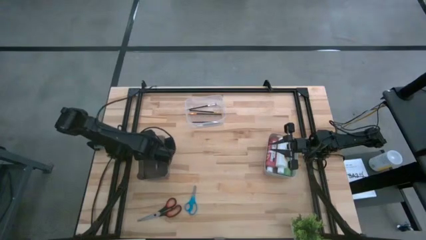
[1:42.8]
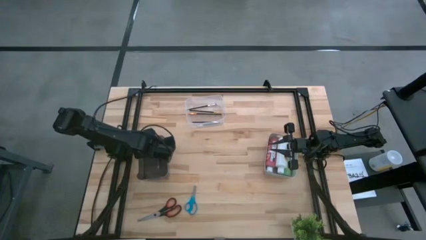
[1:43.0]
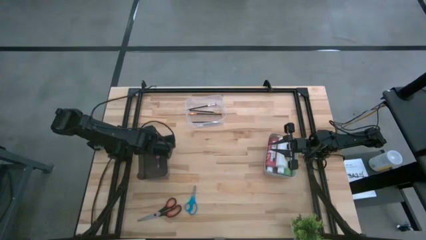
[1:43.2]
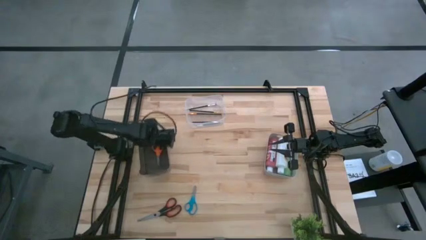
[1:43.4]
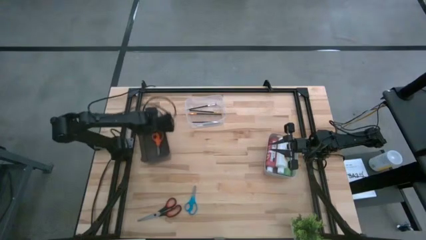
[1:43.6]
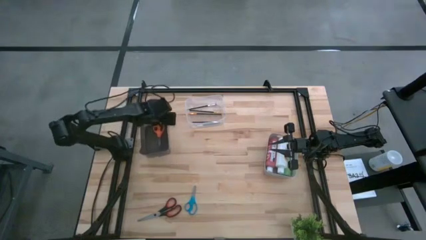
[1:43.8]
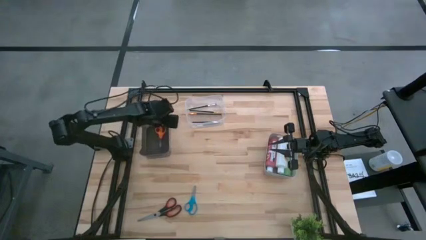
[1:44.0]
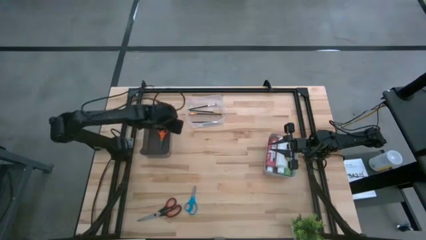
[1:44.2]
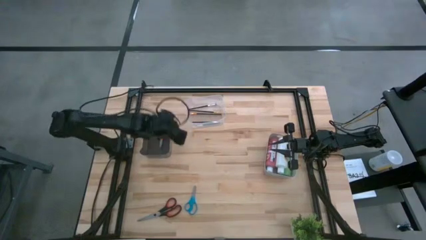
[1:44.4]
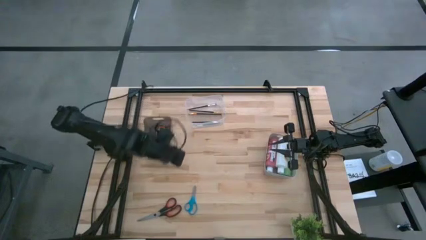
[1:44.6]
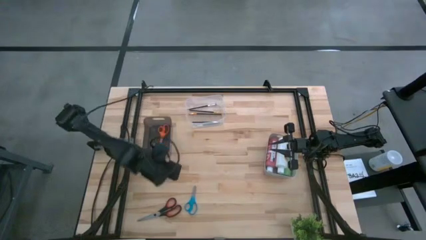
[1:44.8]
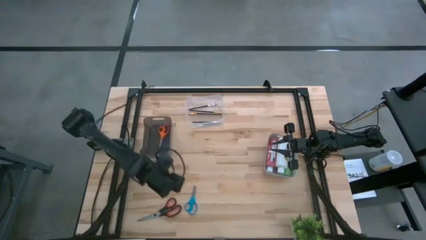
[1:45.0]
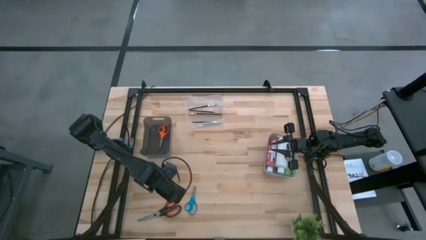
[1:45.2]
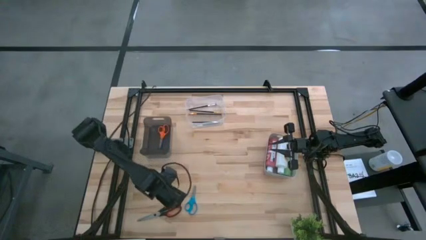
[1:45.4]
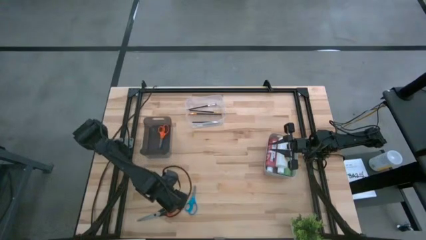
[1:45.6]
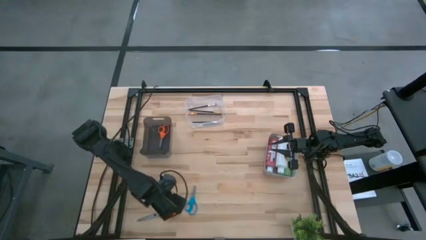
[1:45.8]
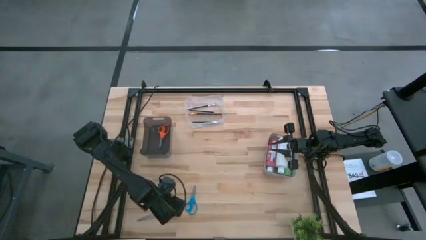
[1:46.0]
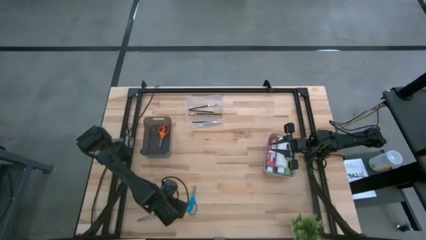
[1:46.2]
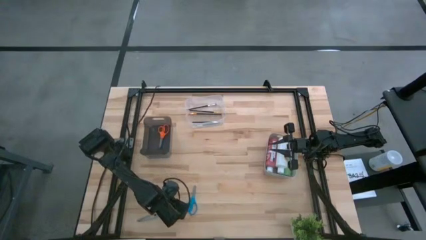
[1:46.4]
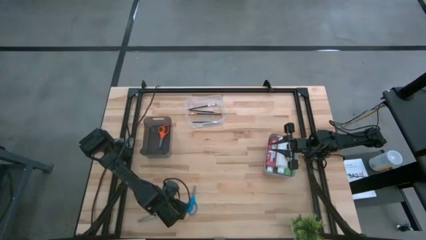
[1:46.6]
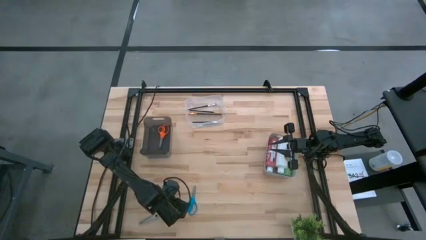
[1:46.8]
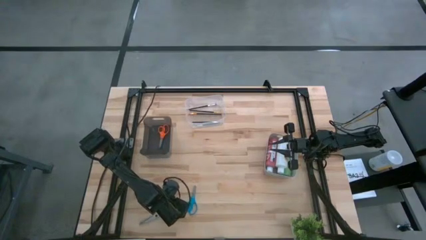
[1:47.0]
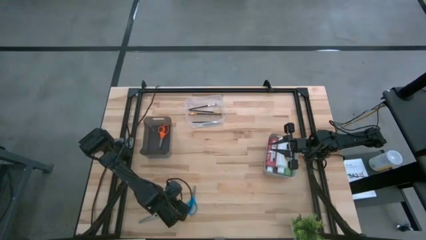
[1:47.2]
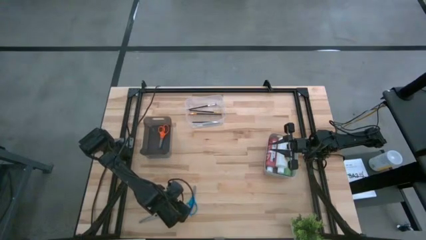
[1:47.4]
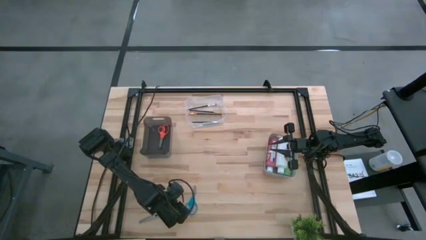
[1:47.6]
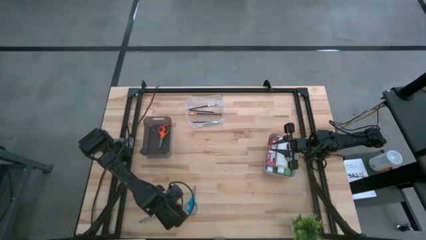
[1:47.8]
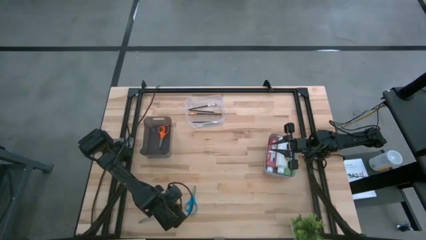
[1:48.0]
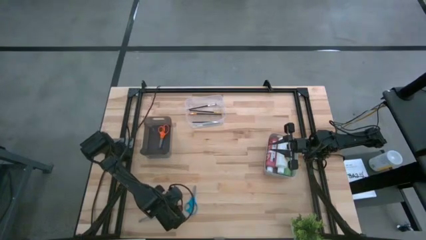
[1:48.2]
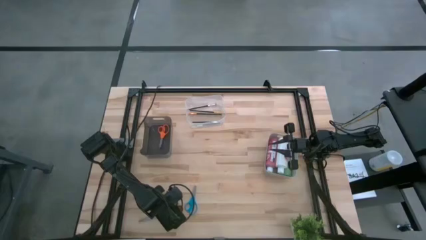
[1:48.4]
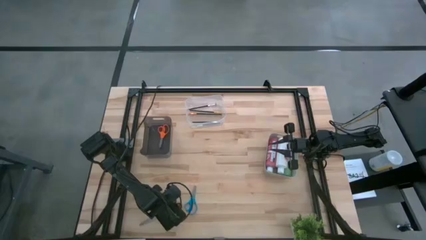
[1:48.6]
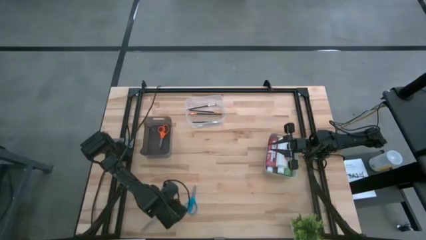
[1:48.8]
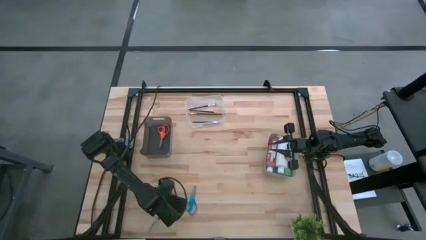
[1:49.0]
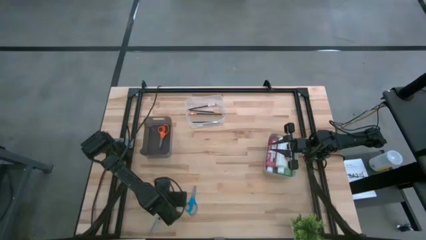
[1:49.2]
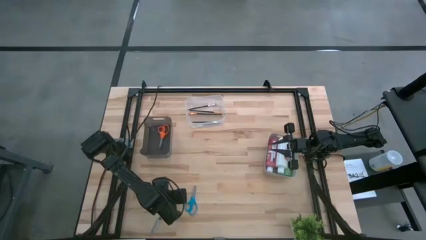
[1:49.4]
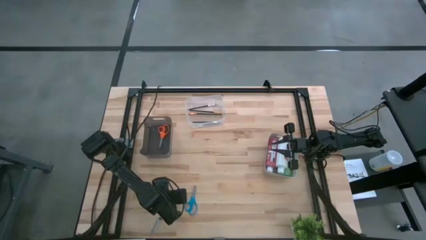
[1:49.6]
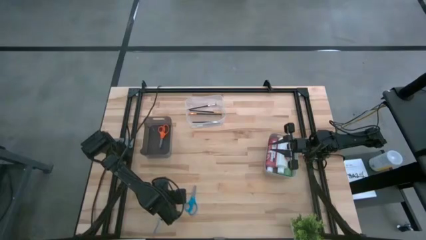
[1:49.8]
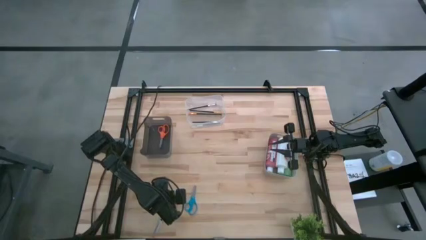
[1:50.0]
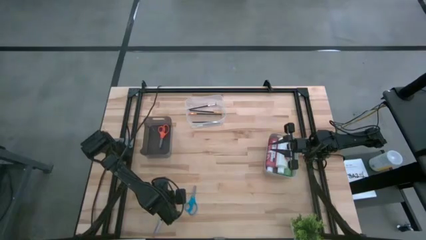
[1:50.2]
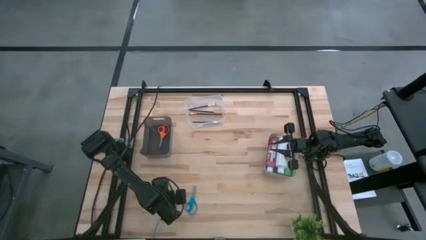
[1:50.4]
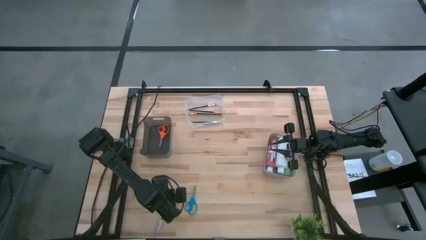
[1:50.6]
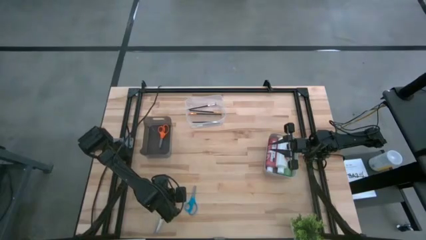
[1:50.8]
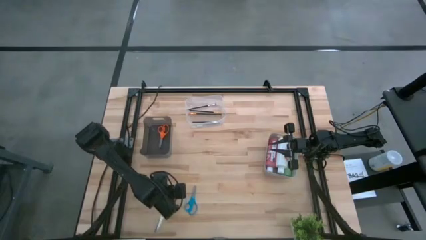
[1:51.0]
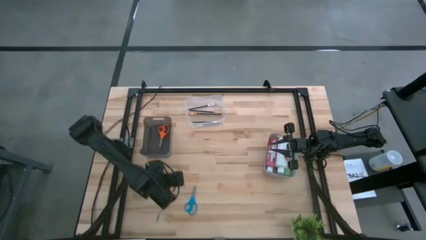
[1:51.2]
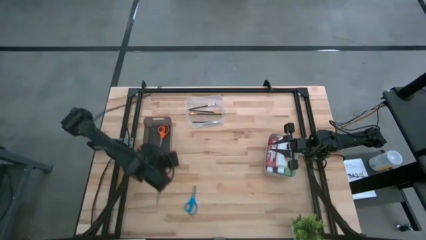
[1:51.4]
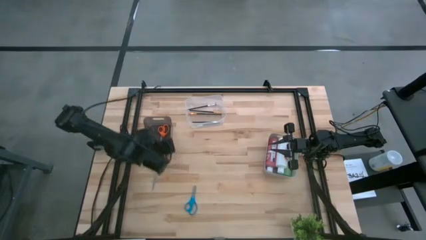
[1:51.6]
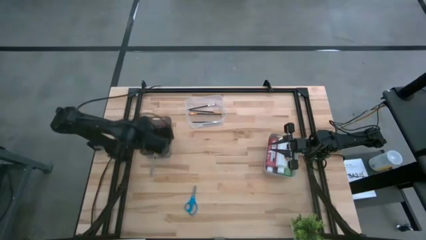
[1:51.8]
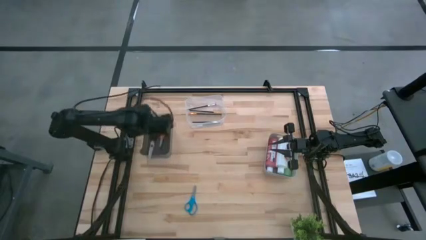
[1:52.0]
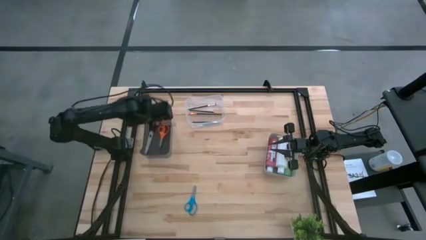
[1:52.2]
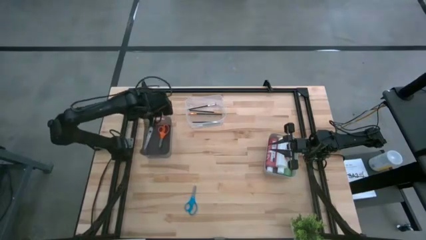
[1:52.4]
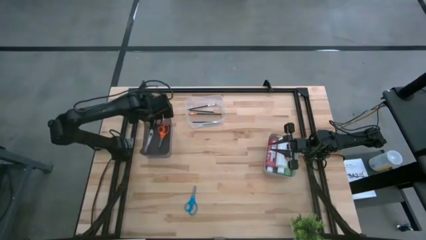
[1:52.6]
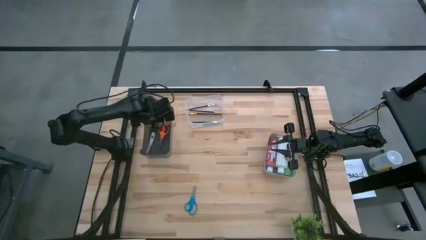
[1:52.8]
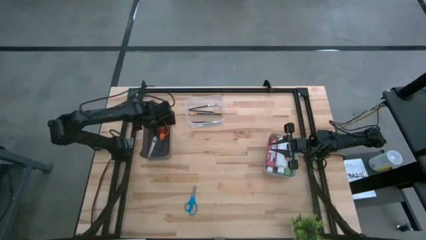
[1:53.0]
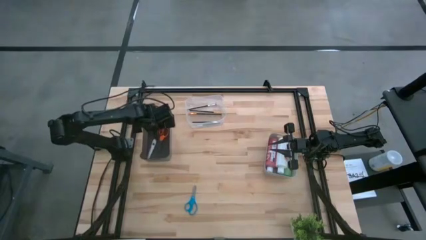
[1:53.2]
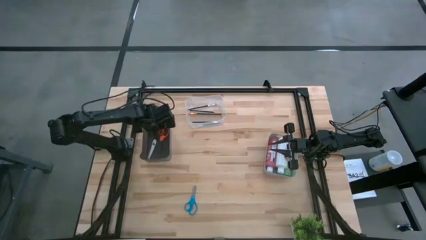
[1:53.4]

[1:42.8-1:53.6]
Task: Pick & Place Paint Supplies
Put the black scissors into the black bin

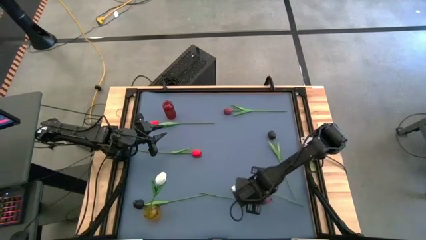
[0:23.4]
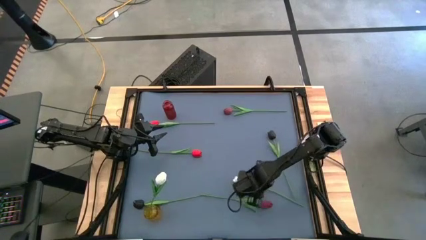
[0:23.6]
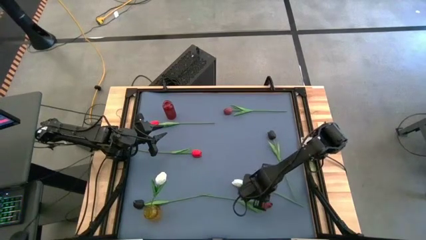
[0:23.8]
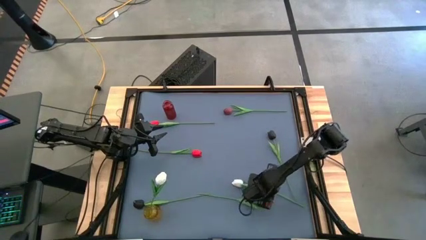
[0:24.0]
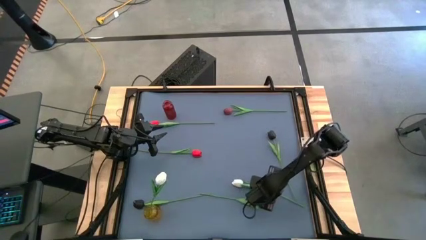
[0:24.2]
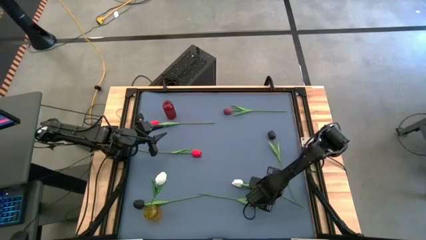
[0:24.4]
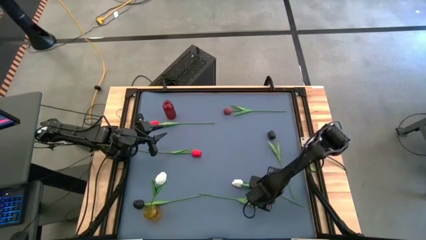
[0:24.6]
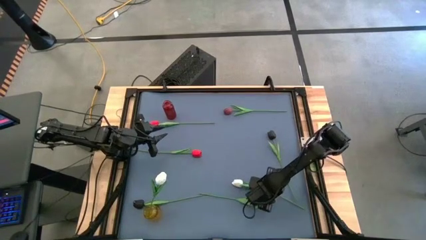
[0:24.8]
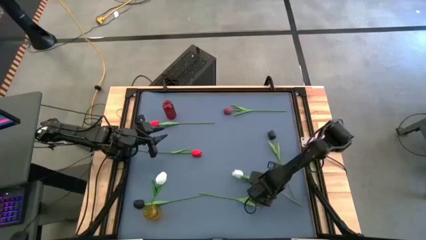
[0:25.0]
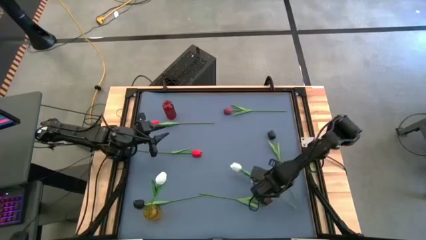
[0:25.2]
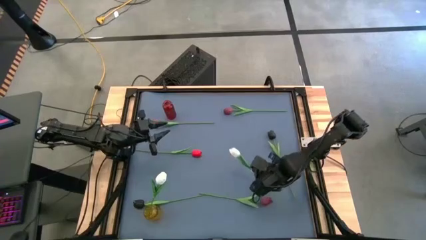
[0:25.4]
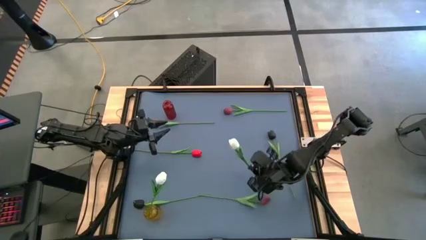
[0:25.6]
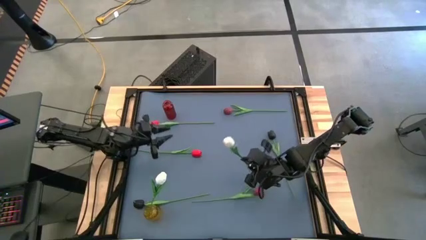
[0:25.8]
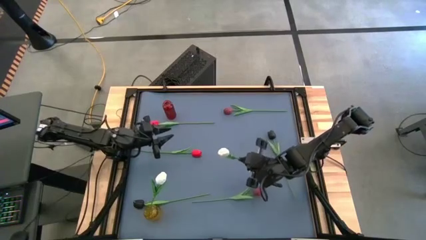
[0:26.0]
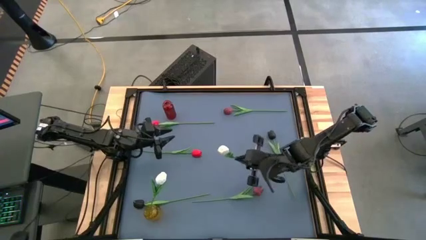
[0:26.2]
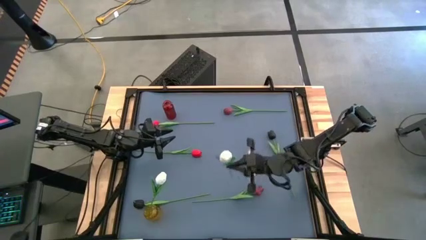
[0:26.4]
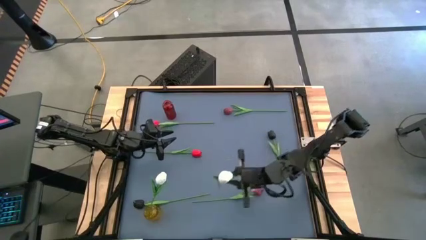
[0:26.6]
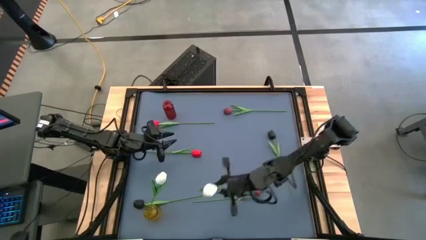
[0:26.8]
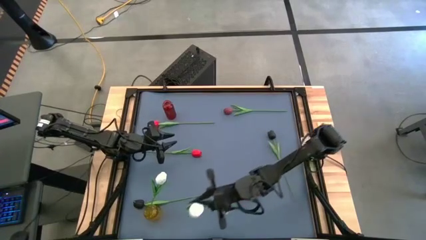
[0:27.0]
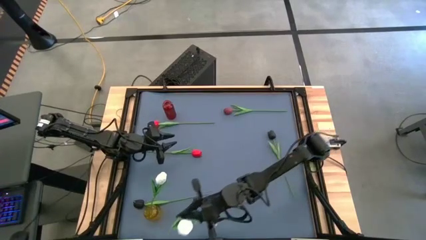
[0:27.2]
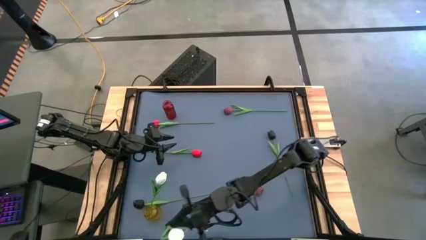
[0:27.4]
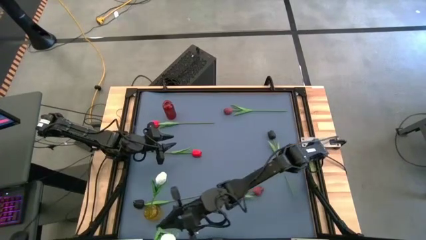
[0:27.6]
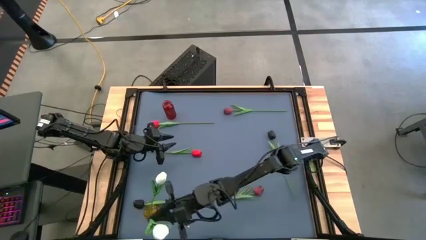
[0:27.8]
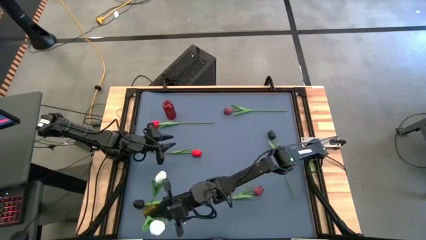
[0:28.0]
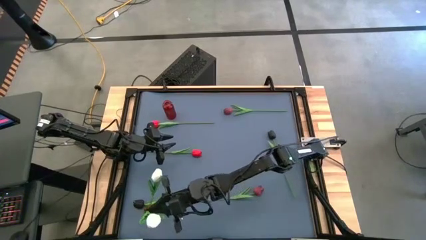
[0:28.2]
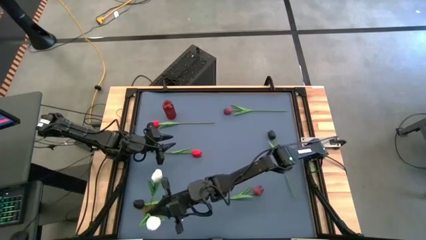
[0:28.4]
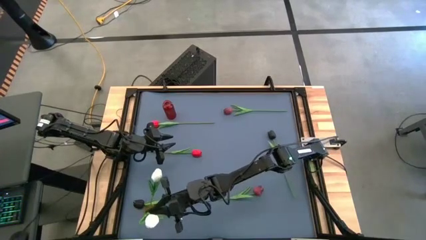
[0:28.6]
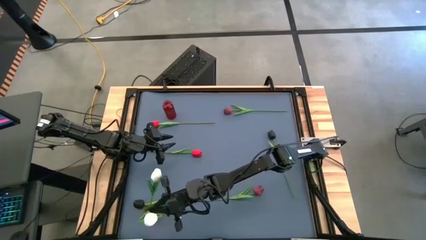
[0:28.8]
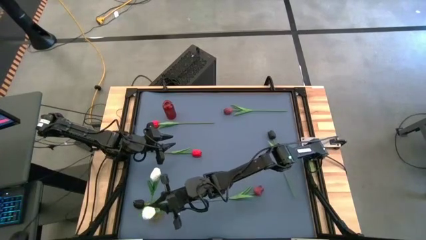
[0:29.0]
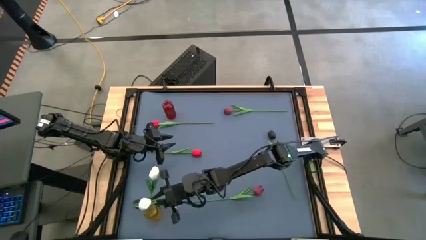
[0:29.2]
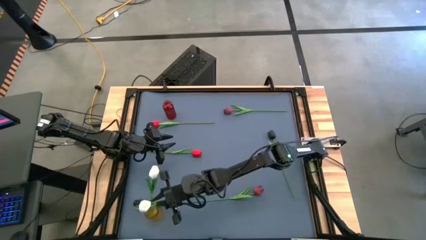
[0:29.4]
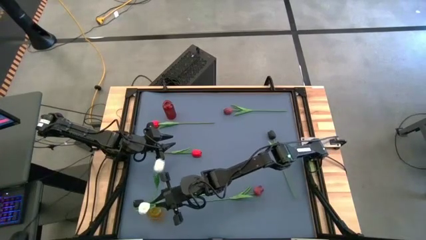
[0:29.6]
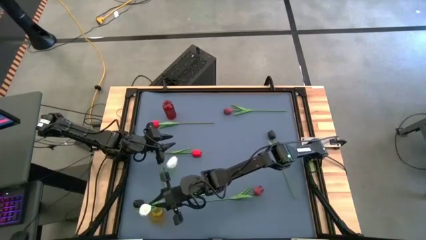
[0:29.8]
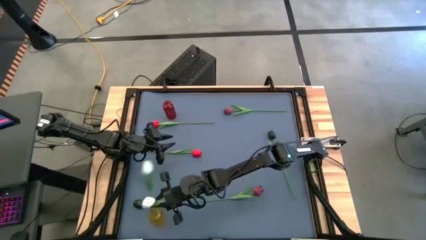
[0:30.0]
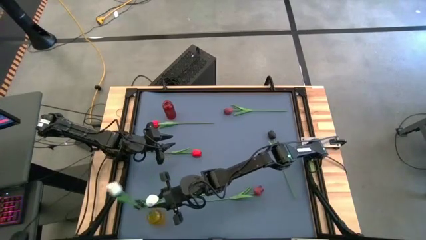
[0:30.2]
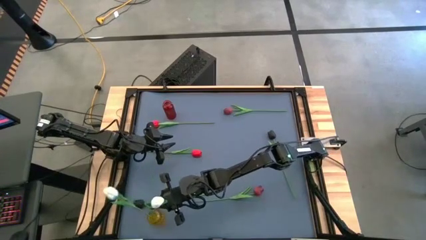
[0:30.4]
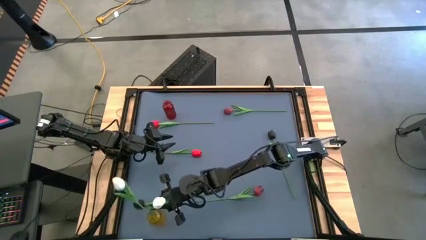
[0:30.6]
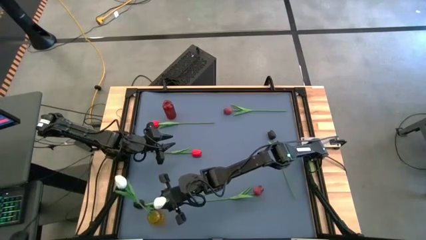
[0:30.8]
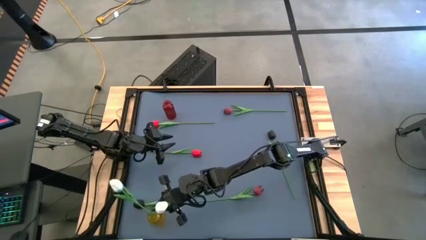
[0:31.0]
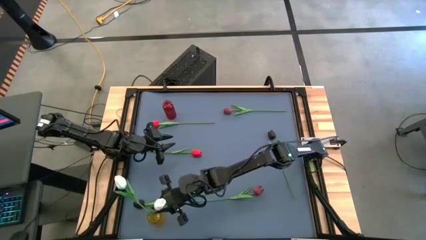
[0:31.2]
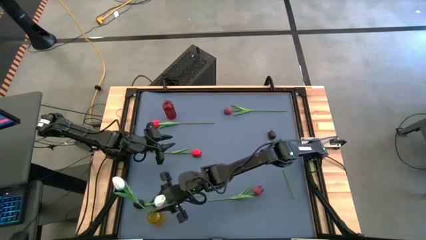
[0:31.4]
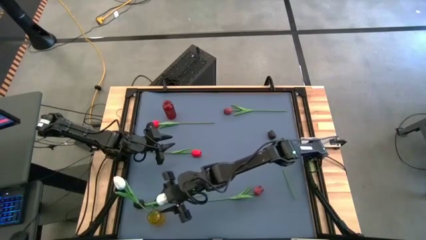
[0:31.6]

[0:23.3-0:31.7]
Task: Sort flowers into vase by color
Put the white tulip into the yellow vase
